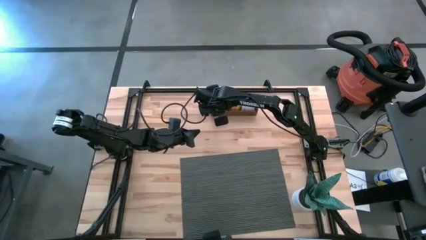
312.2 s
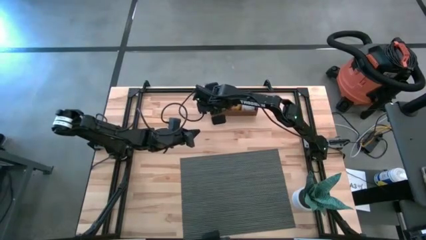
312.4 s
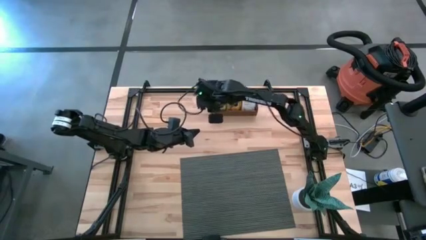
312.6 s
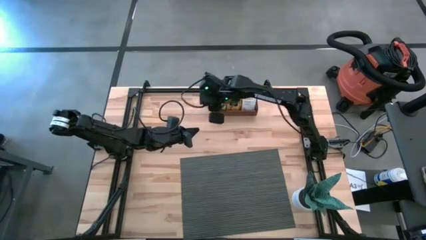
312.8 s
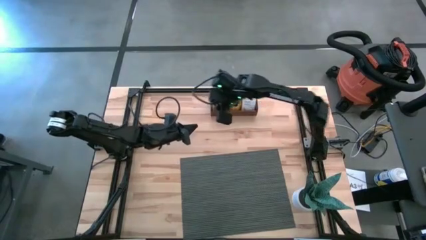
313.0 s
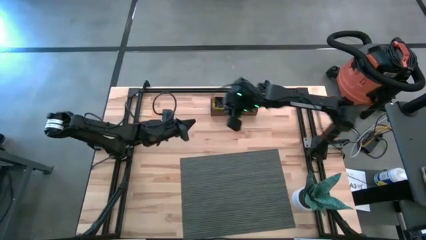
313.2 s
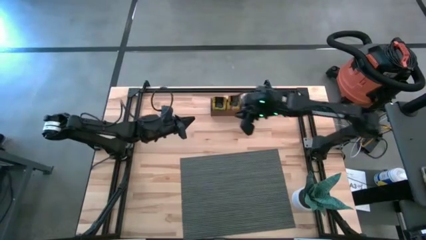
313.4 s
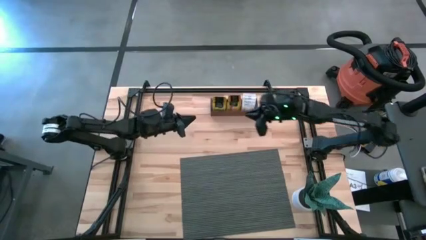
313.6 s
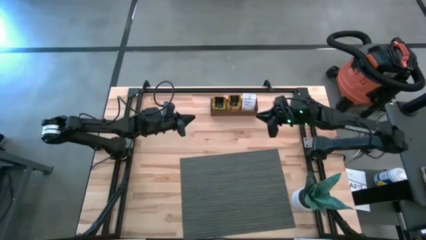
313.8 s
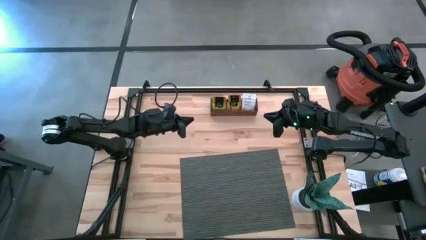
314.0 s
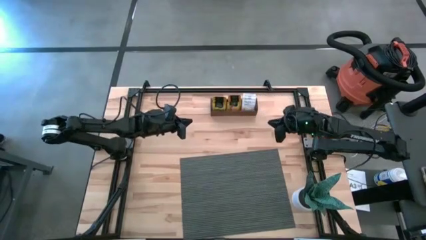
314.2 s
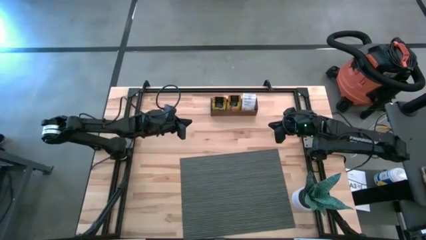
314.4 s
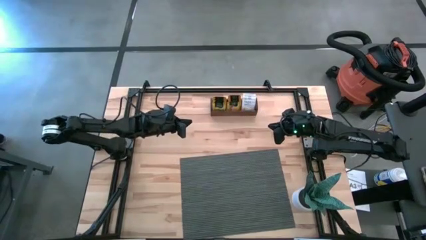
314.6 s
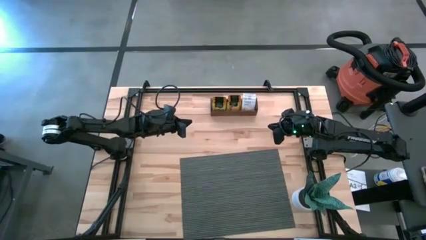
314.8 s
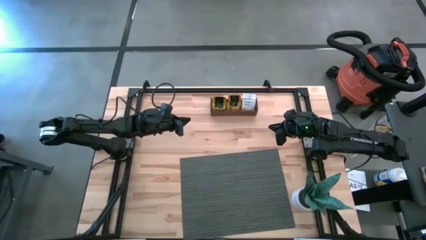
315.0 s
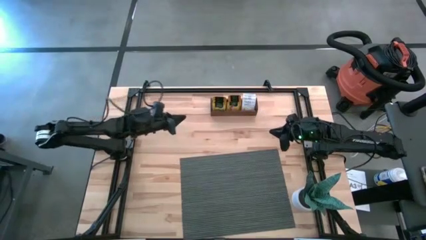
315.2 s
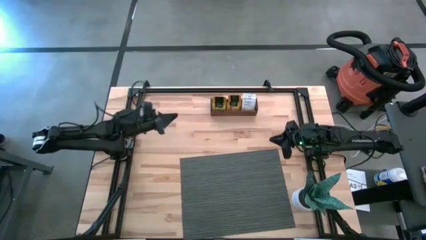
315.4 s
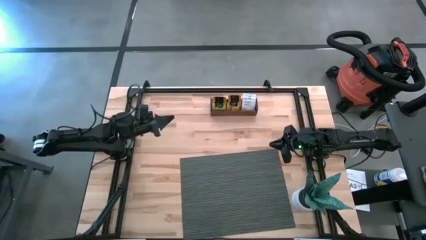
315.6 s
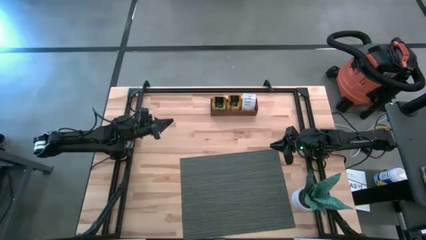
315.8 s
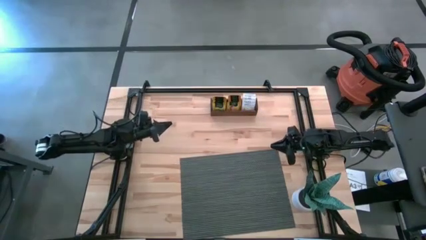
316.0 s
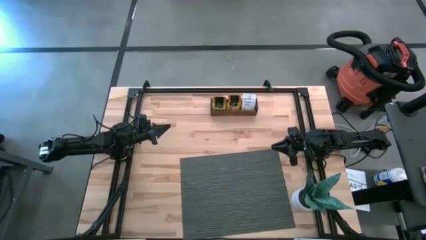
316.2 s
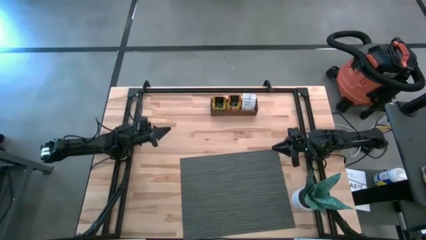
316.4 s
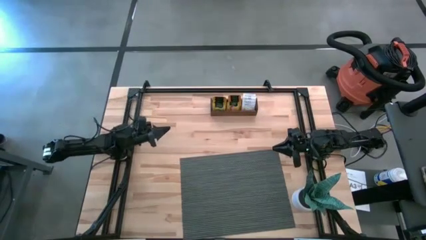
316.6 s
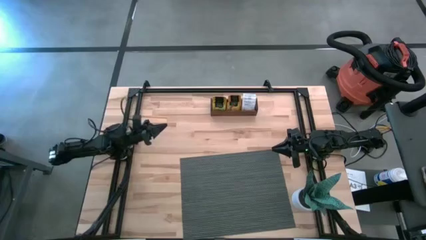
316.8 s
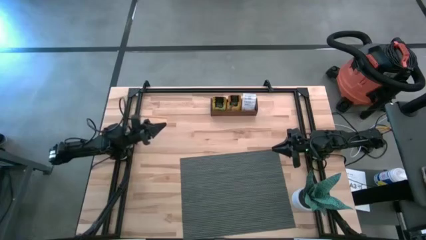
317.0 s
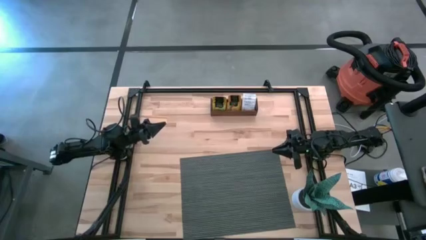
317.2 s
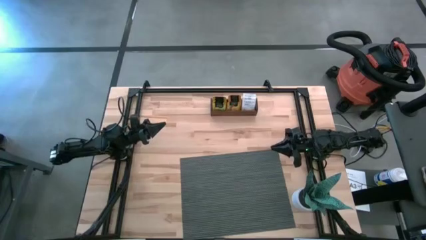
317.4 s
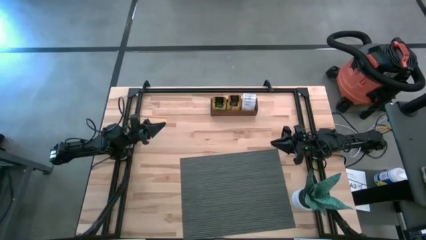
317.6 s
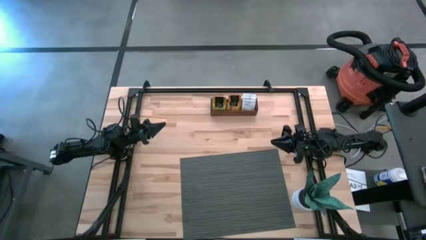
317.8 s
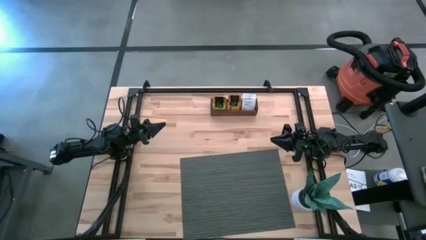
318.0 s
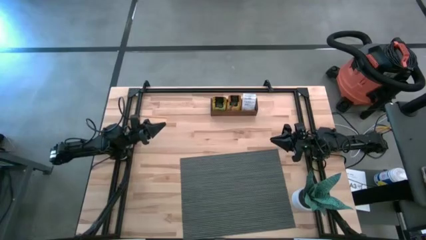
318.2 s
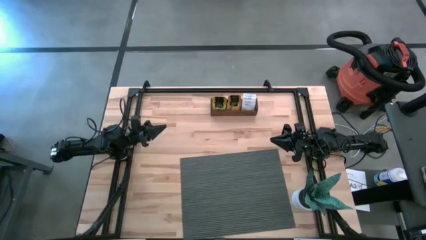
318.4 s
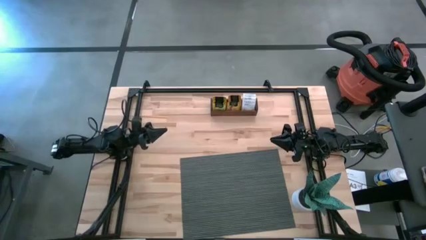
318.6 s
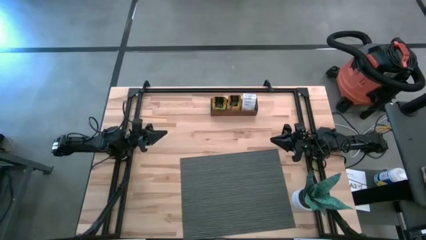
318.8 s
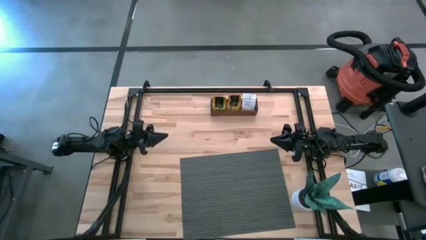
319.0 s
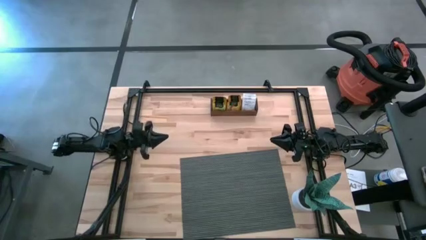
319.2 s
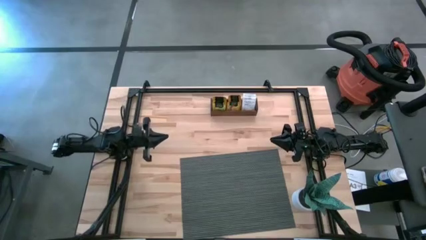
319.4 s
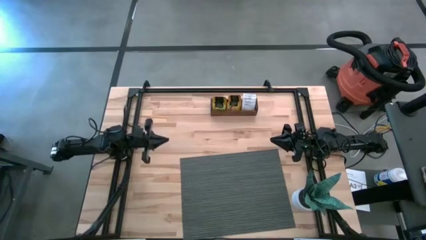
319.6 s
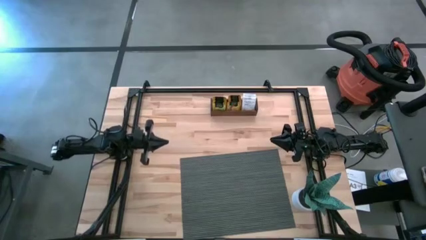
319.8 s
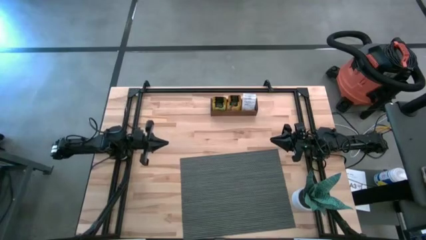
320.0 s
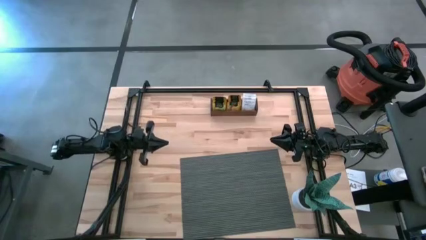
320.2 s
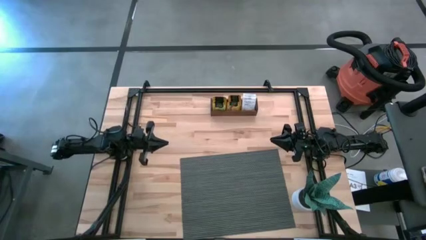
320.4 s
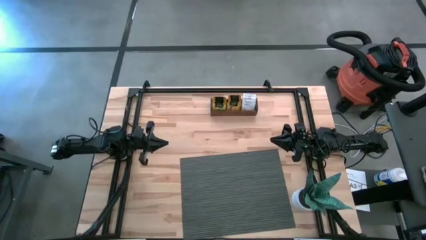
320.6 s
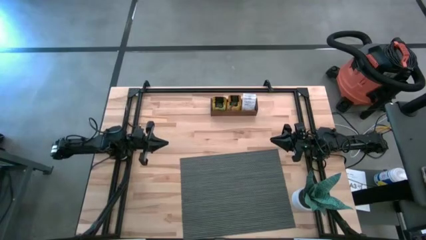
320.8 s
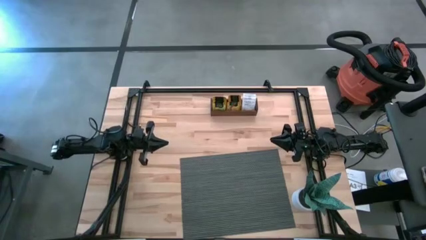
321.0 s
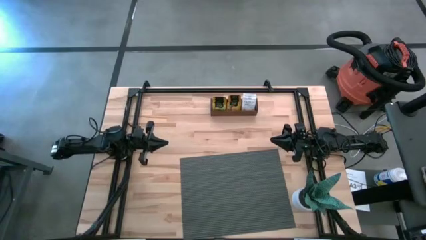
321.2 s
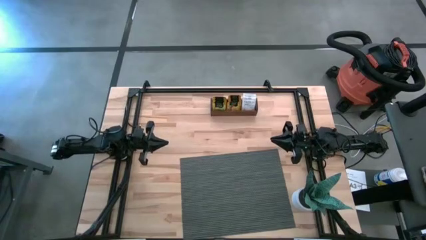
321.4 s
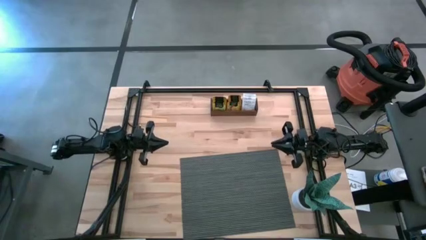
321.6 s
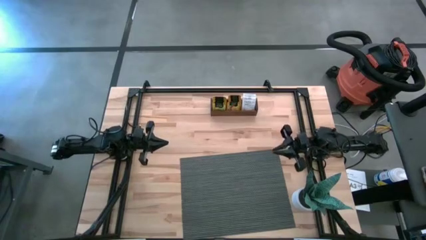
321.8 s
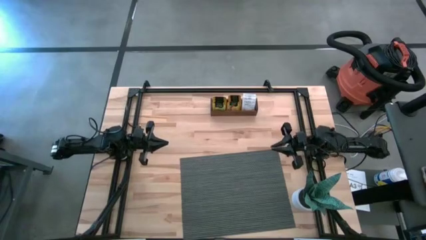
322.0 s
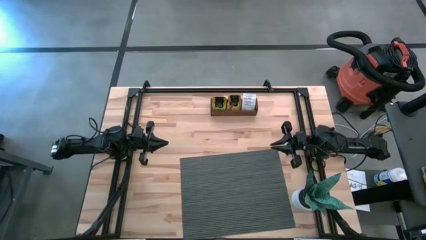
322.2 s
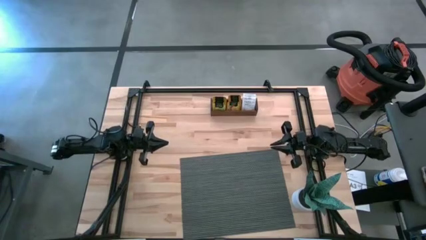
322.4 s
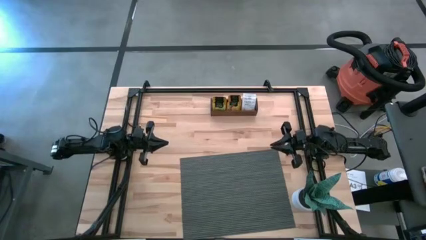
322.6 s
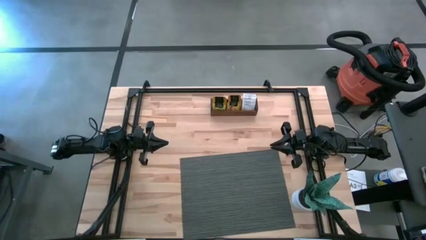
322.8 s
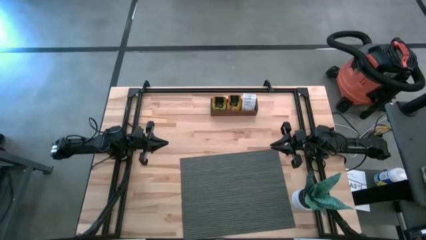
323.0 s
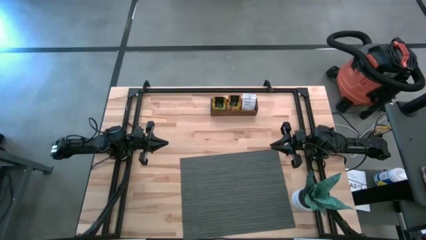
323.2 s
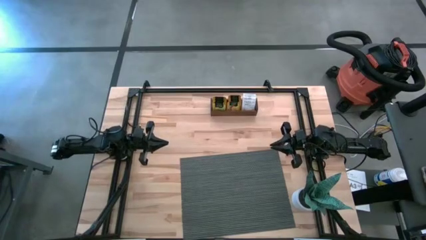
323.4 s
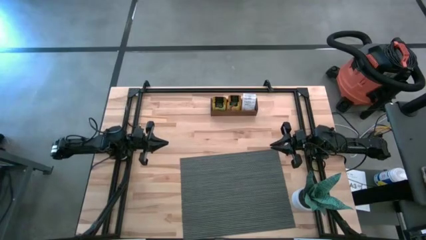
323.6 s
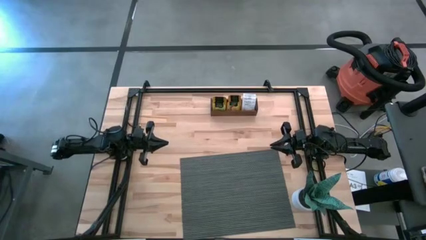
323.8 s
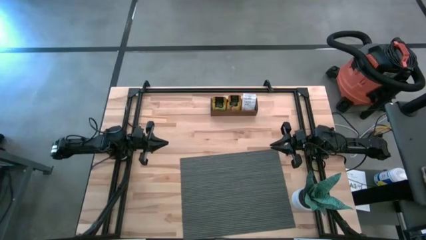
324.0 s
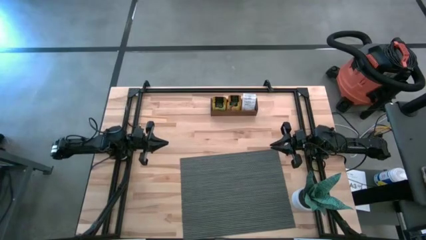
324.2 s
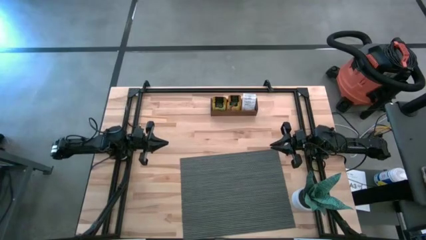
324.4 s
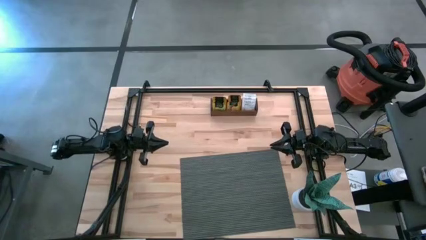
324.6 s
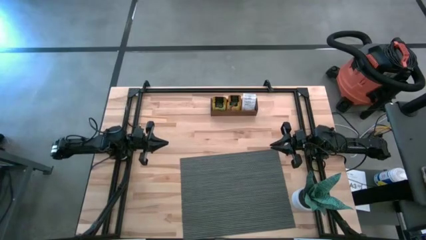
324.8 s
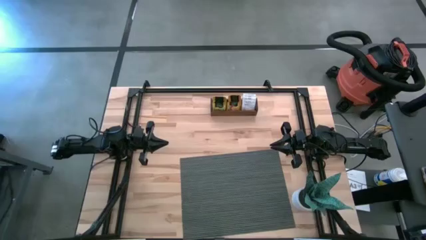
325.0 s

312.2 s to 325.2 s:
Task: Pick & Place Tea
Return to Home Position

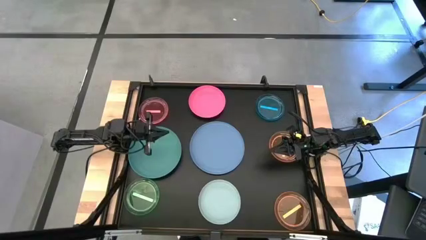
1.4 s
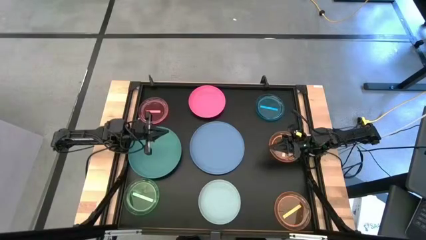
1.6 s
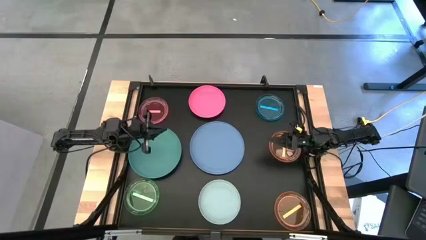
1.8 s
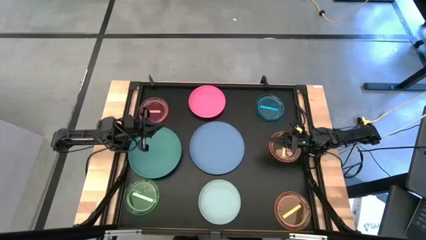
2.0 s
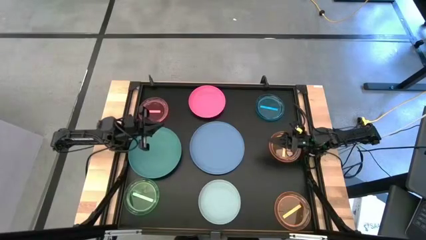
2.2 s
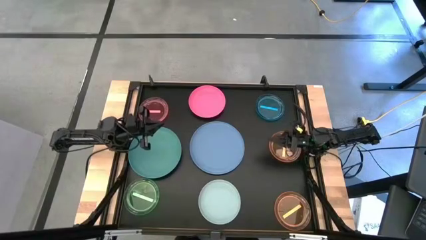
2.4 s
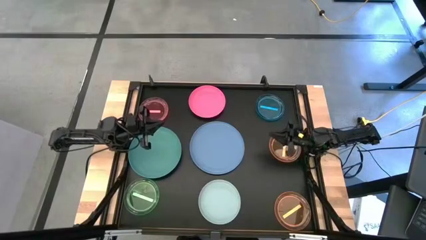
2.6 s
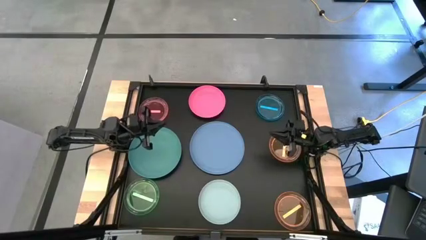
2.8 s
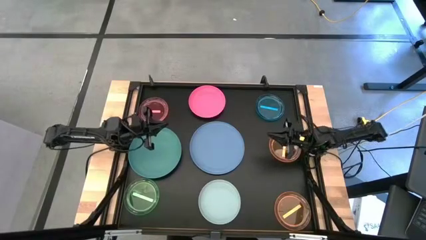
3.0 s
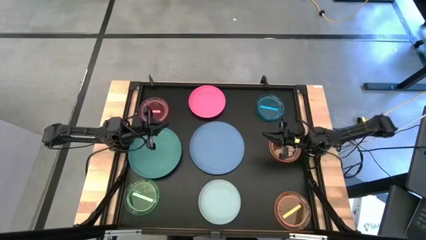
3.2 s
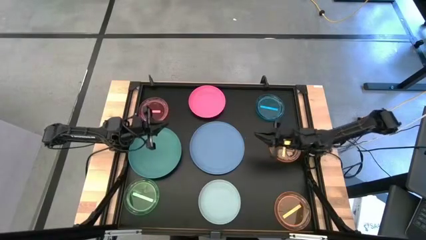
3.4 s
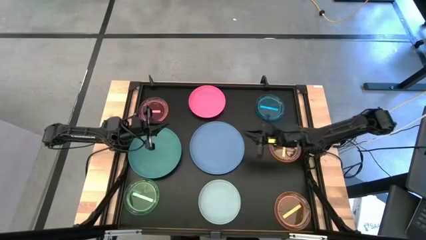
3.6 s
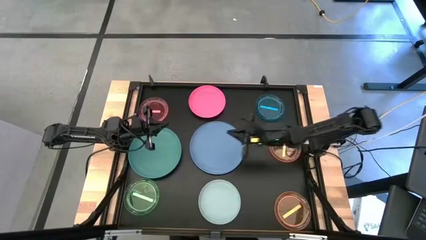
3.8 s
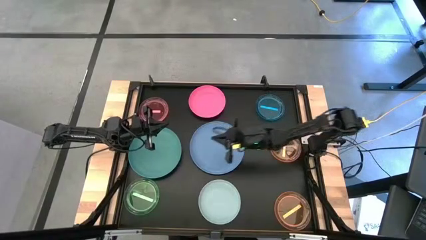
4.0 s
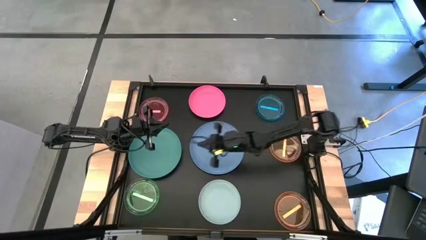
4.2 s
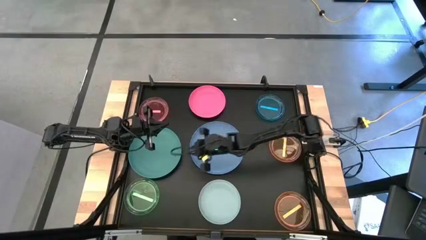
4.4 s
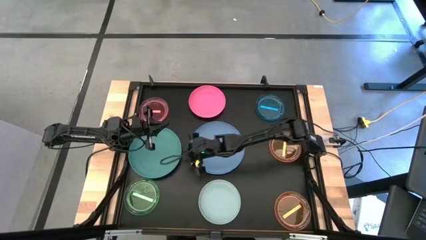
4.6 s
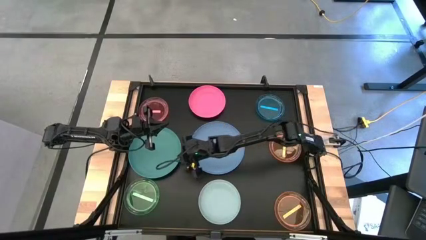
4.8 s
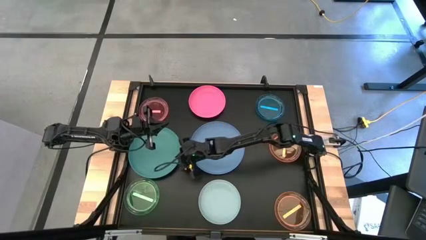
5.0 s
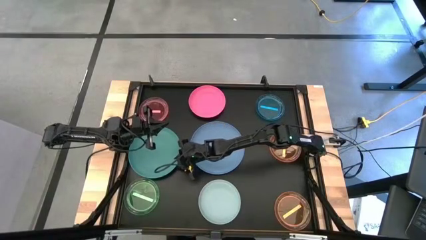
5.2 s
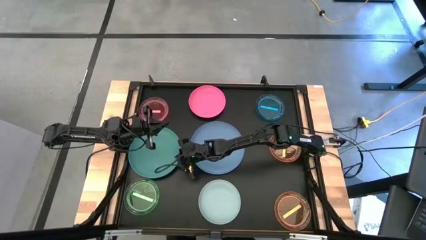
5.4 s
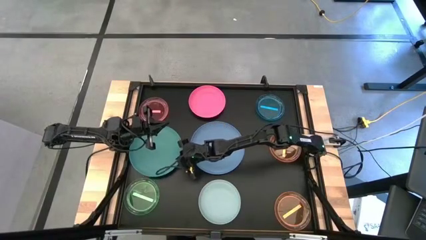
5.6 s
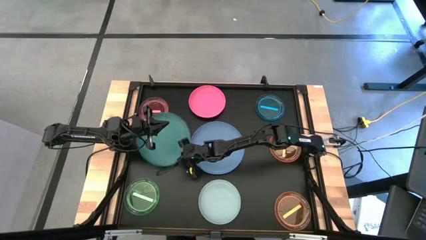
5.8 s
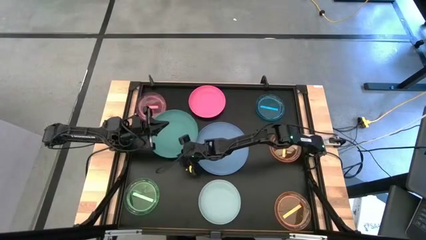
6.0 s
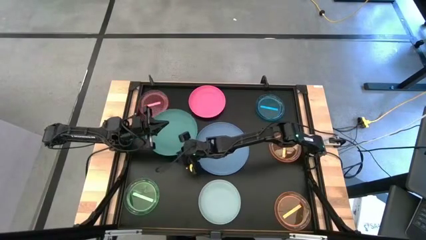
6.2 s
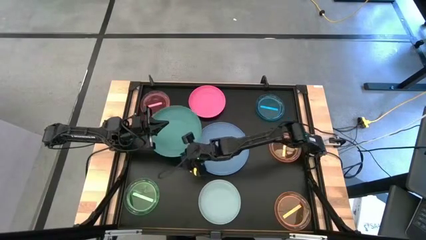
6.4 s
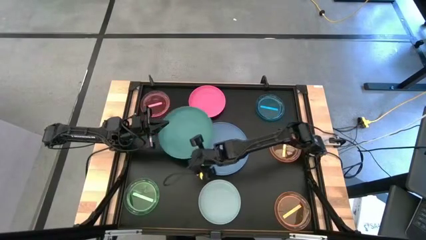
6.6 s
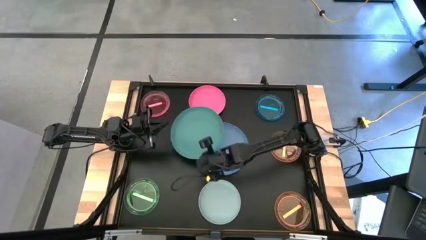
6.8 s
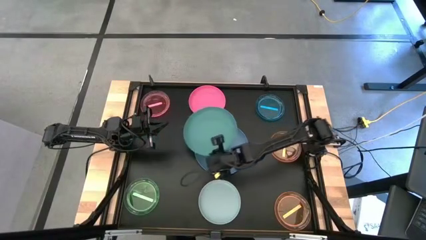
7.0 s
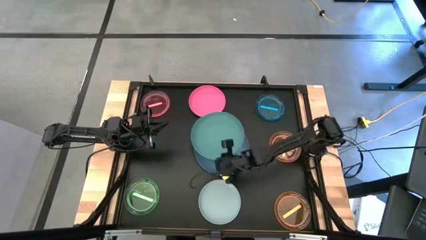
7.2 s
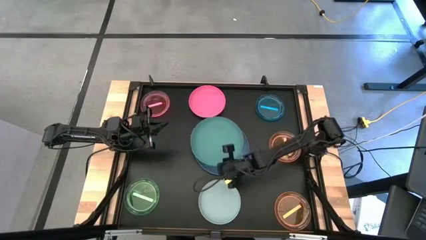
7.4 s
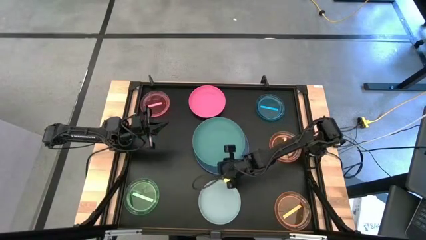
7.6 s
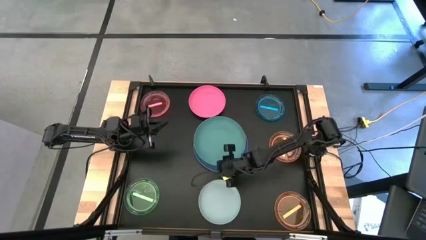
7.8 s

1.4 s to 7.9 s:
Task: Stack plastic plates
Stack the light green plate on top of the light blue plate
